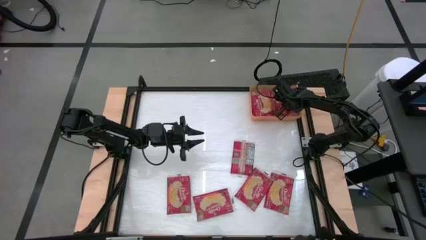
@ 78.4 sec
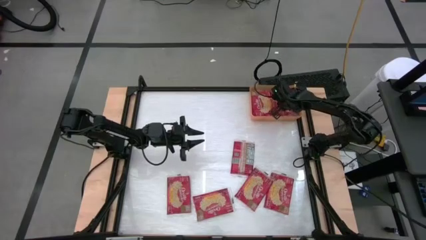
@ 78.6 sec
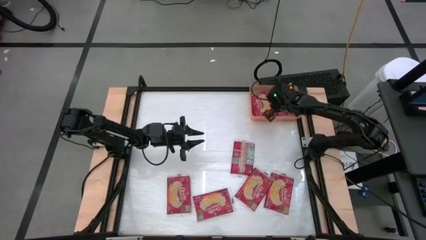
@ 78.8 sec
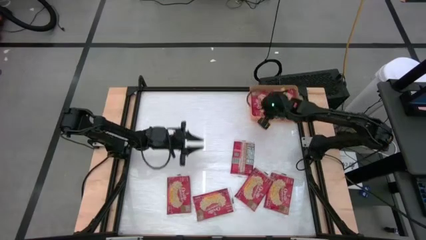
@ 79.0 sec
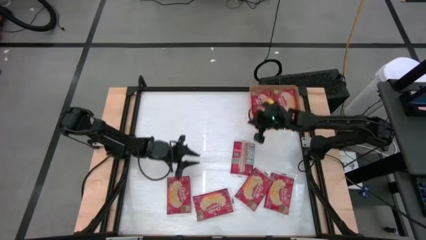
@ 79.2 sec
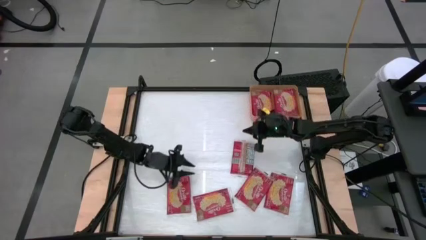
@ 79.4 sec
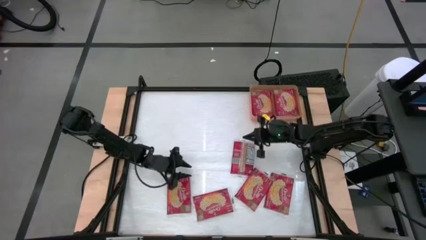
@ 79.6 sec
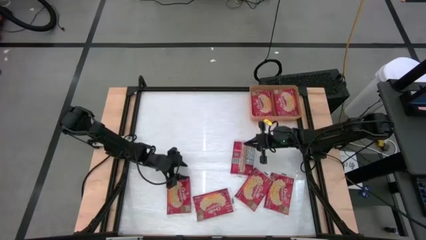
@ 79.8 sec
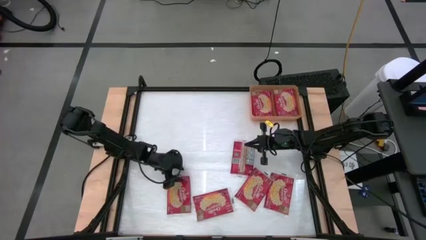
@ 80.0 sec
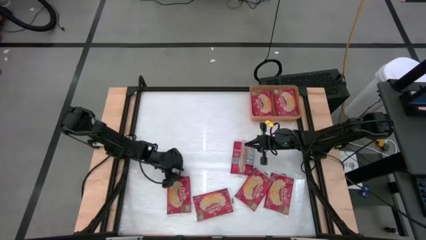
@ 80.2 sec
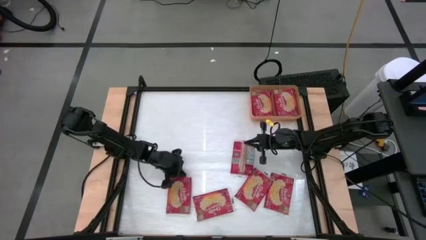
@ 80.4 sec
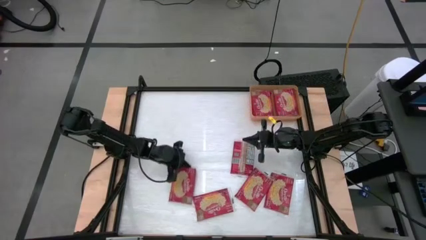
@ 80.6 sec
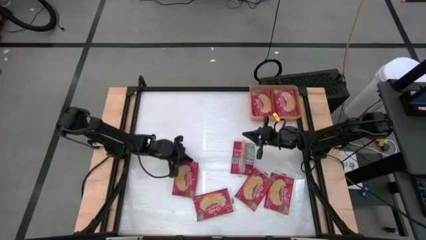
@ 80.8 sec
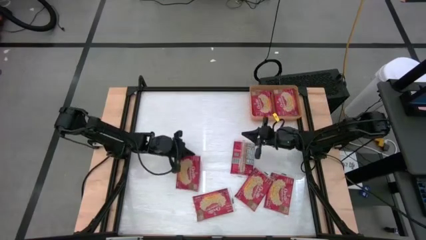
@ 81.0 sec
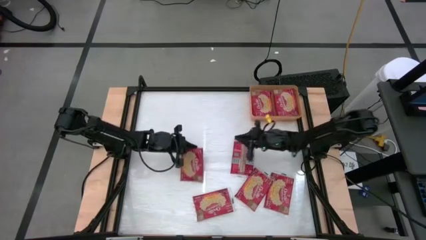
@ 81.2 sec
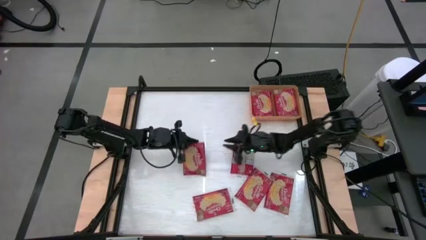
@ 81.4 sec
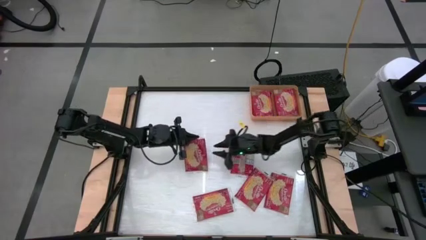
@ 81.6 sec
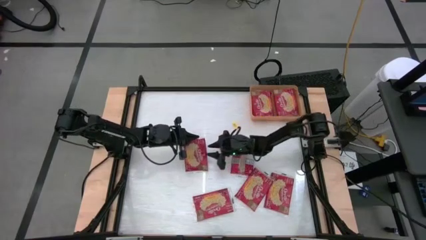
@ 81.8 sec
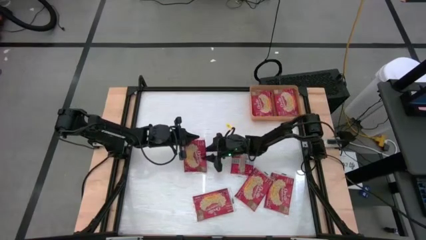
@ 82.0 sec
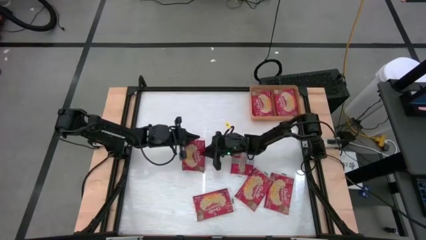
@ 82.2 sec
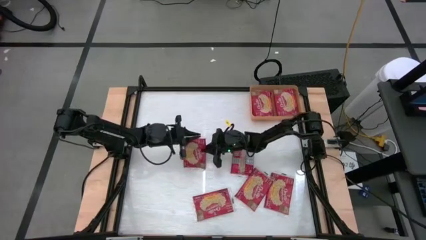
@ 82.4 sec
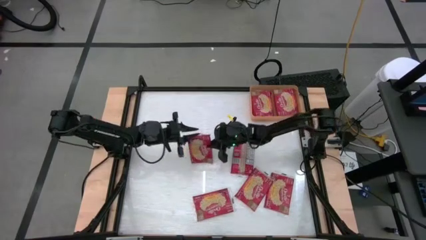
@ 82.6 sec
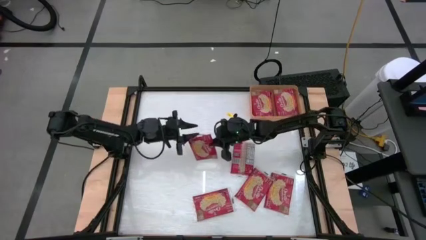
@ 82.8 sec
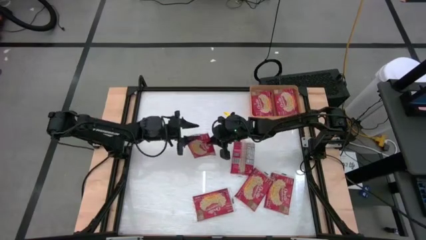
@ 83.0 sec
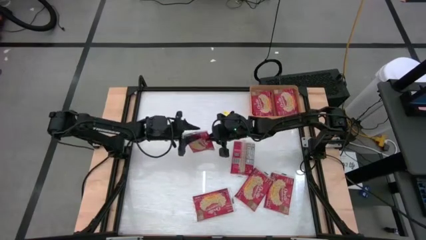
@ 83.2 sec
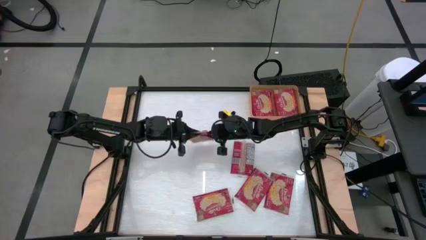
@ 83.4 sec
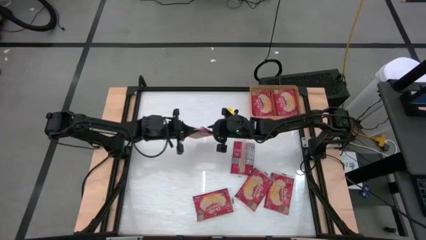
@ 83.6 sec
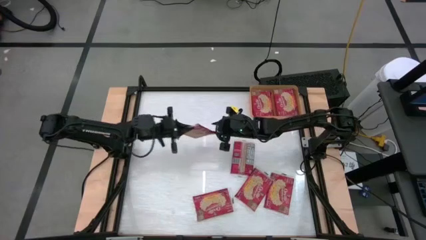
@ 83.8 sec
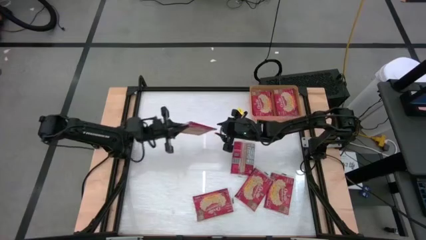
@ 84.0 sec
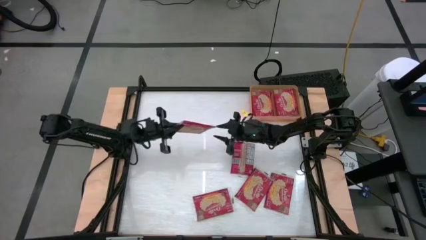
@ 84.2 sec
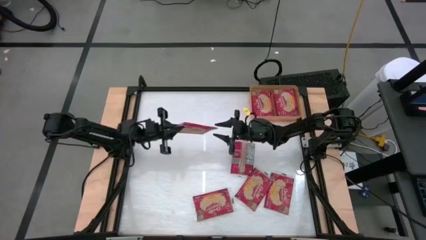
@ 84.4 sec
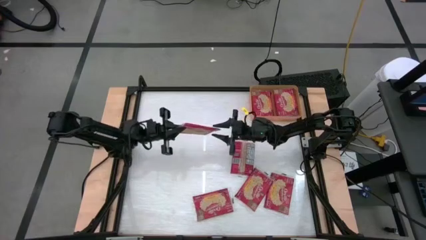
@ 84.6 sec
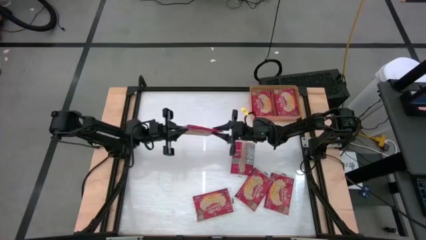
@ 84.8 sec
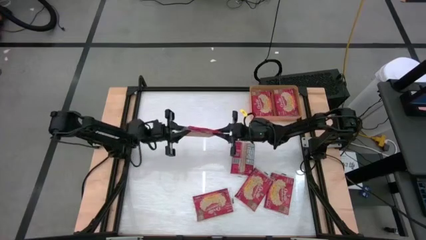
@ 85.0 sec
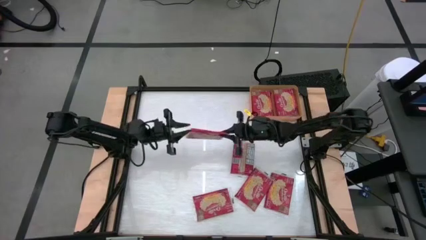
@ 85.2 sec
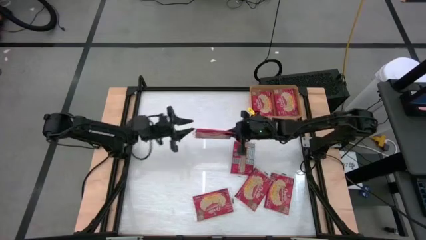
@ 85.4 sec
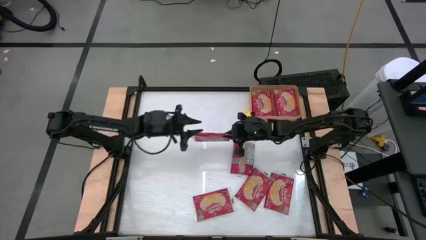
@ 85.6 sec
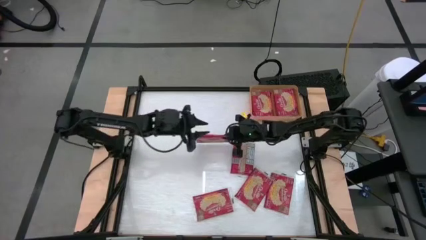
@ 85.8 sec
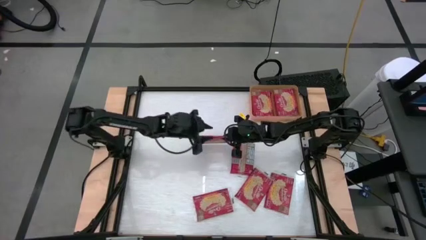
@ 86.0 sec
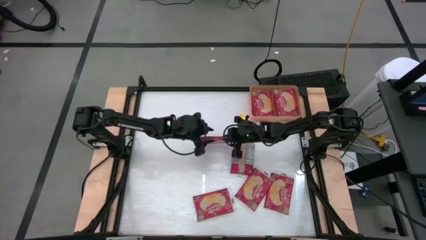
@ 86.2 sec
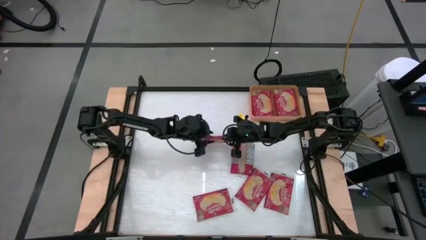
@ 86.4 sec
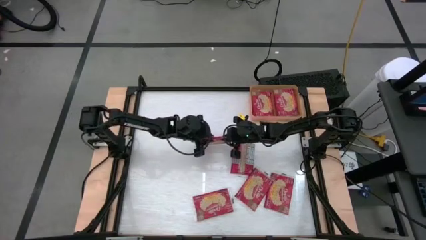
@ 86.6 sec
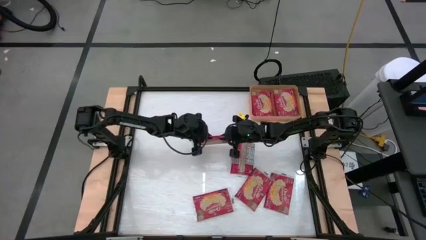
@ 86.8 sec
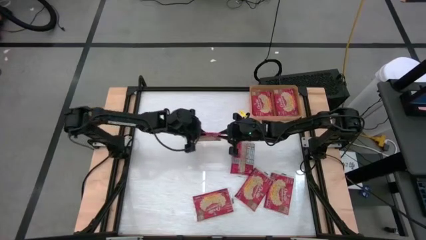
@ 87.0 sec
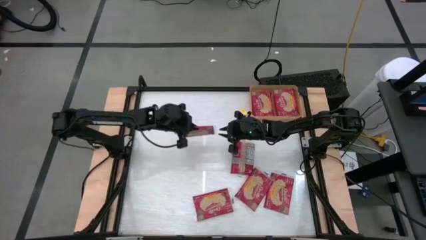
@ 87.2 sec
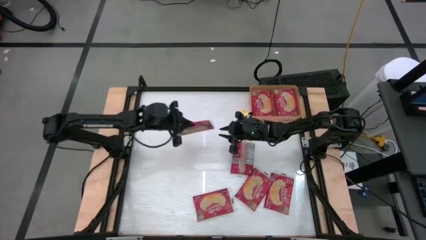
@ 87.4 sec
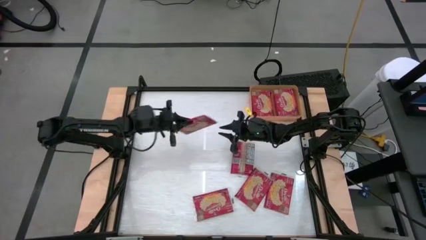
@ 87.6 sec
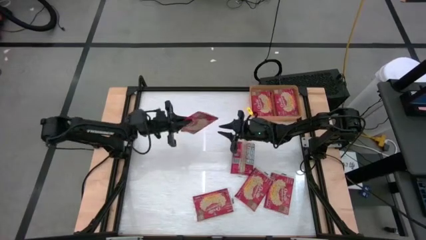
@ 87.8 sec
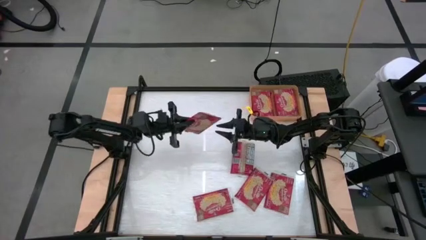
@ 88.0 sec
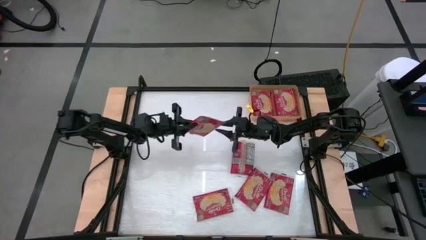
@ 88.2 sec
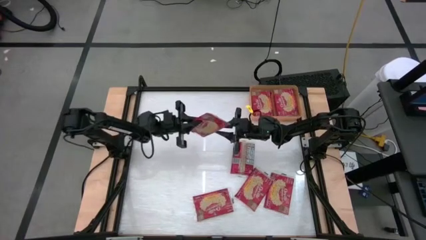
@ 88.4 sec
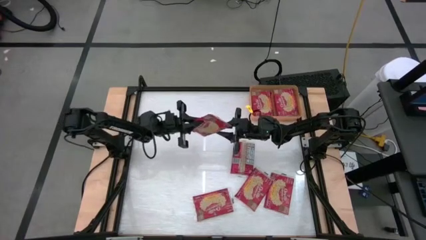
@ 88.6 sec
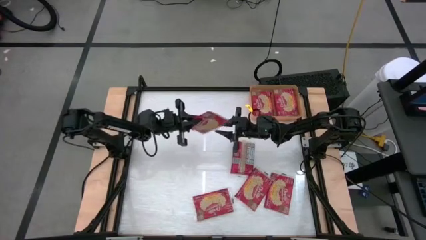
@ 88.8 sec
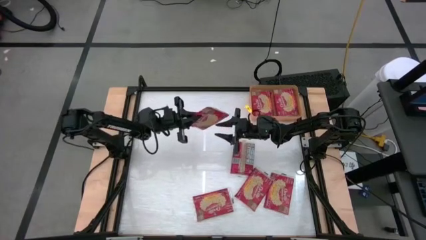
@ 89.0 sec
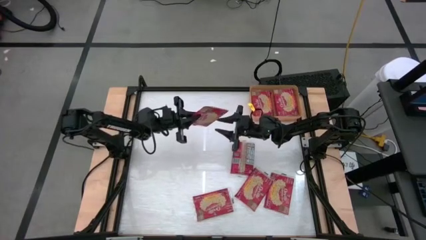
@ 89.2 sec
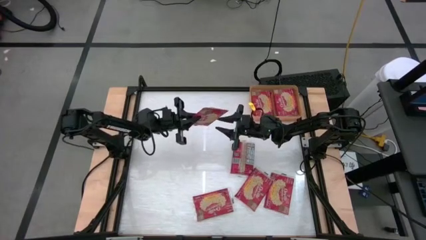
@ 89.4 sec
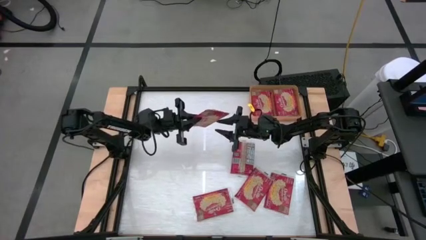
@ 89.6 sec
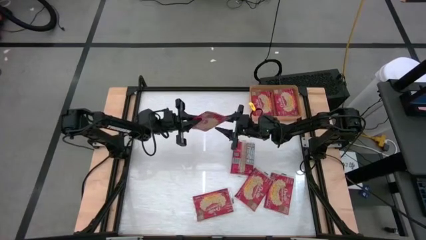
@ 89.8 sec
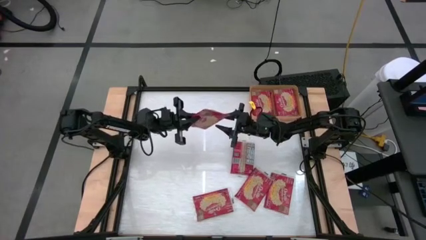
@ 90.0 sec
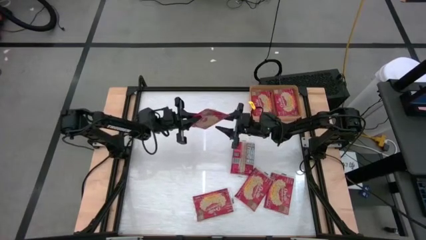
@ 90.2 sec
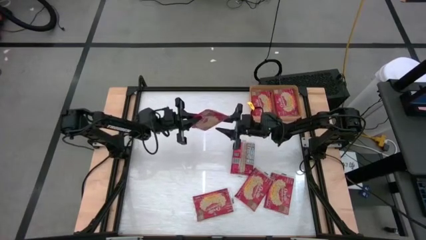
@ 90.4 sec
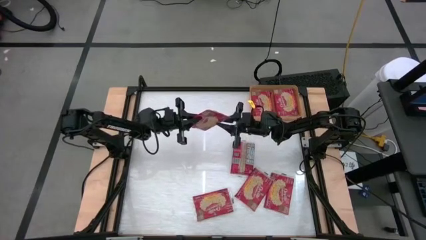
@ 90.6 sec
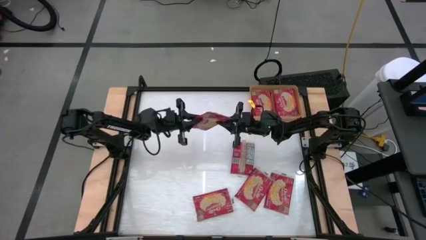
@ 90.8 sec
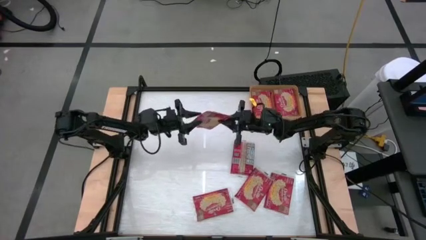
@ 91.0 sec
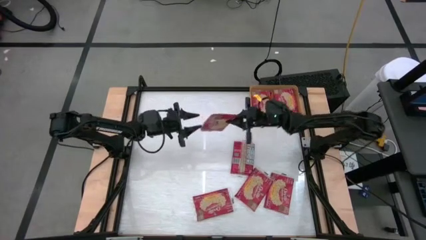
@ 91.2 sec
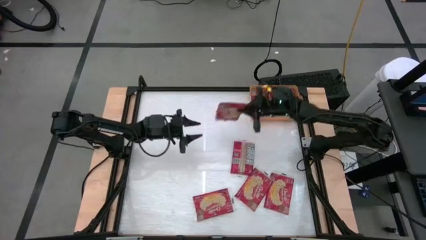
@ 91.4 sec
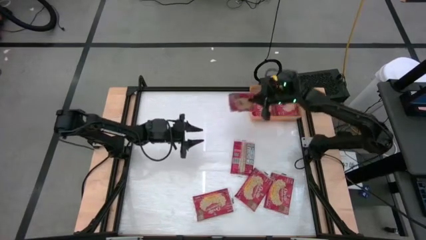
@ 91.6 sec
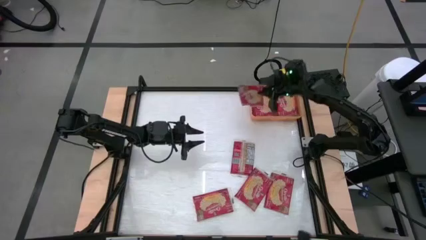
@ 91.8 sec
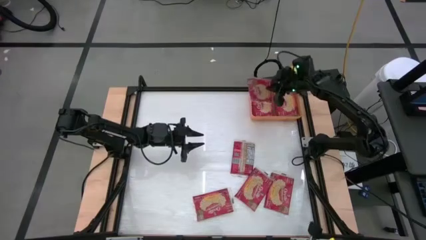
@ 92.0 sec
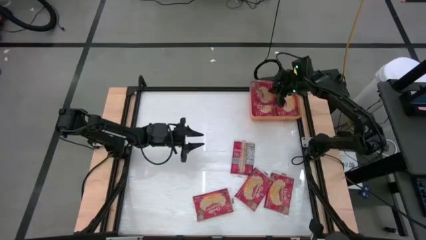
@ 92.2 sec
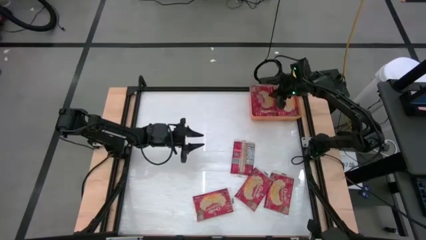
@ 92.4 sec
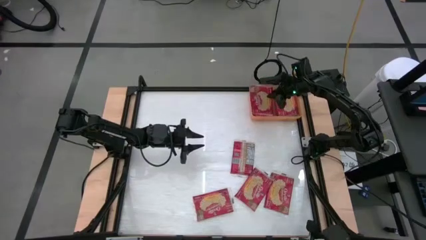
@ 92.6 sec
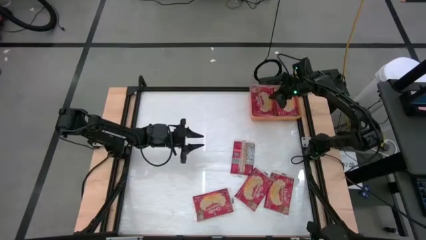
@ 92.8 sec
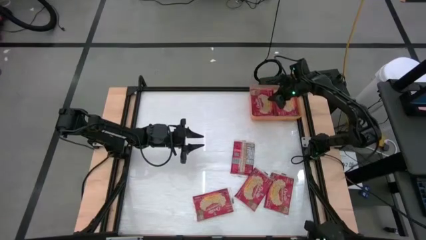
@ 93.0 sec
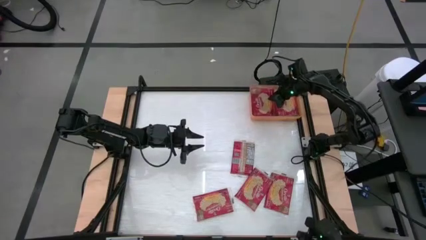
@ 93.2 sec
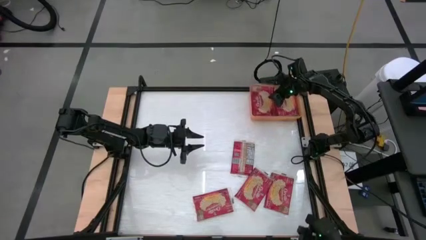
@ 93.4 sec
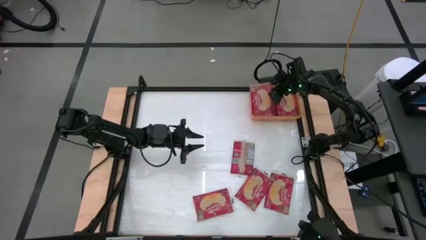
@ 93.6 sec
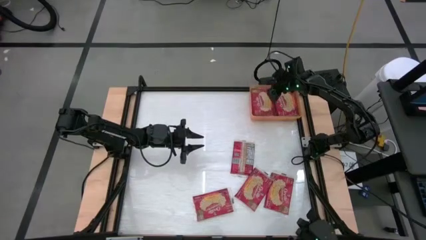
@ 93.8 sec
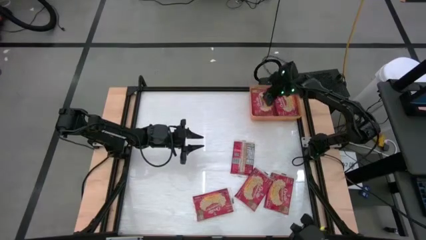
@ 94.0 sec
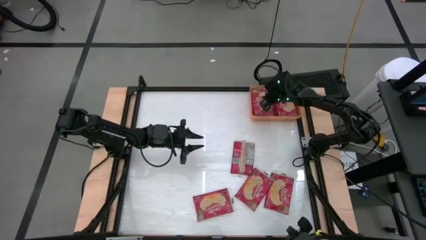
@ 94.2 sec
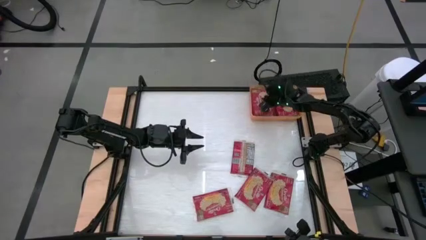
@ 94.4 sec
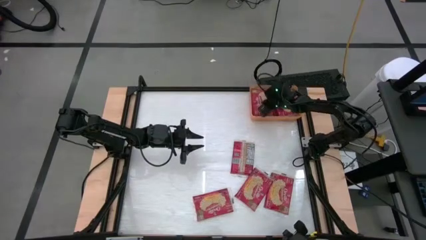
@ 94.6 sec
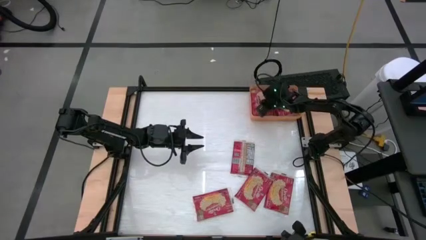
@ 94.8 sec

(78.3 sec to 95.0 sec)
Task: Sort popcorn bags into baskets
Put the red popcorn bag into the orange bin
